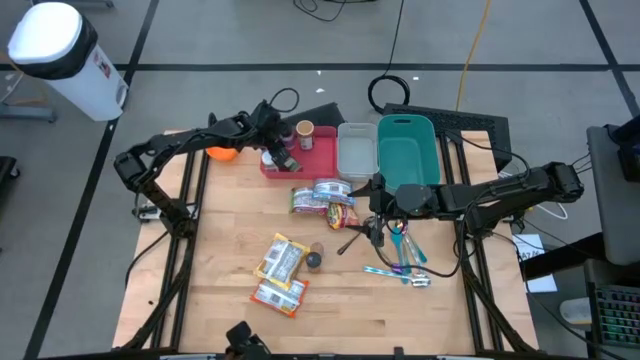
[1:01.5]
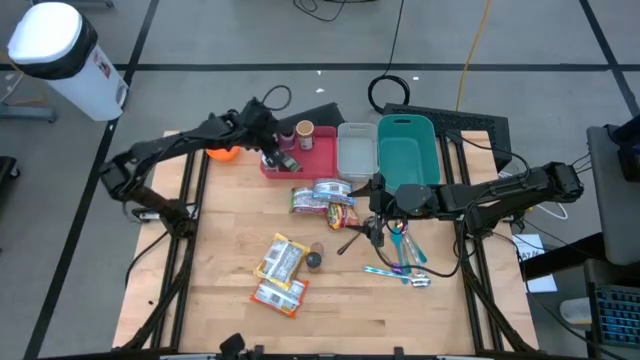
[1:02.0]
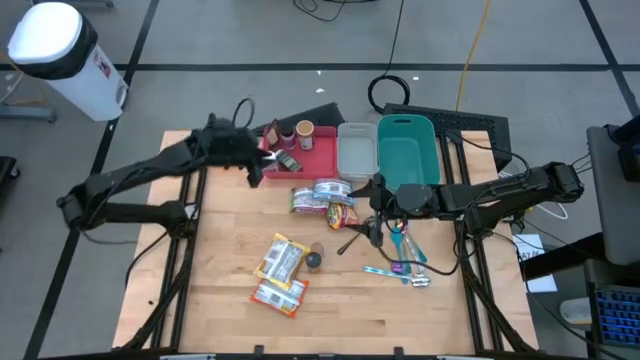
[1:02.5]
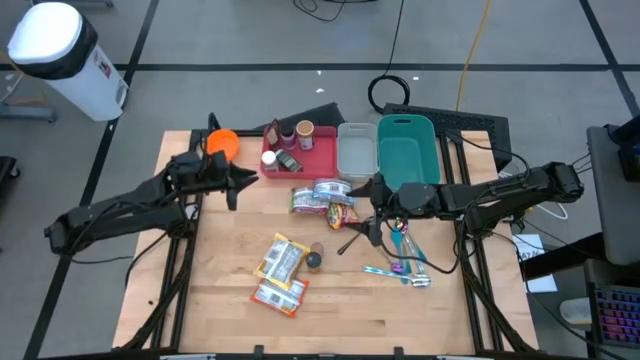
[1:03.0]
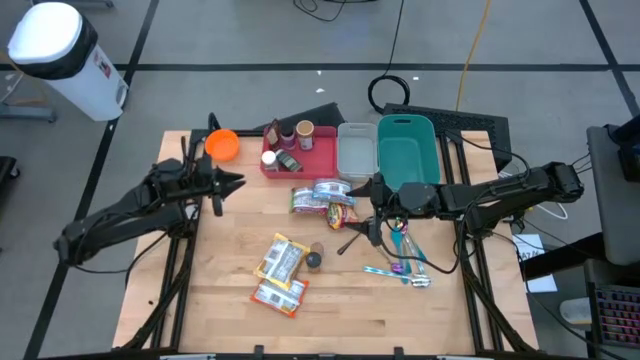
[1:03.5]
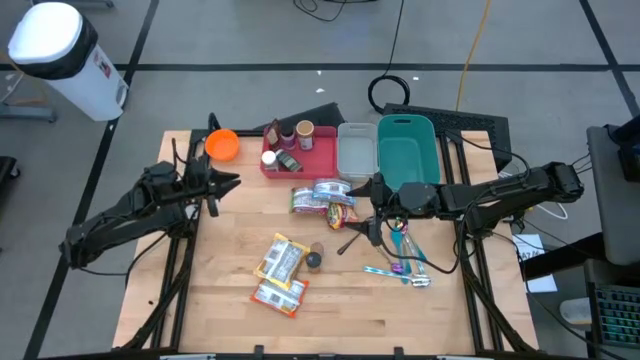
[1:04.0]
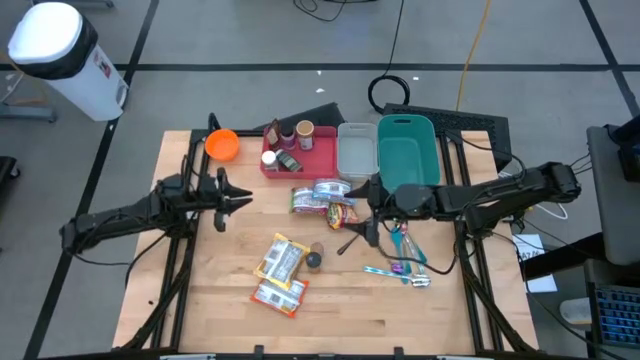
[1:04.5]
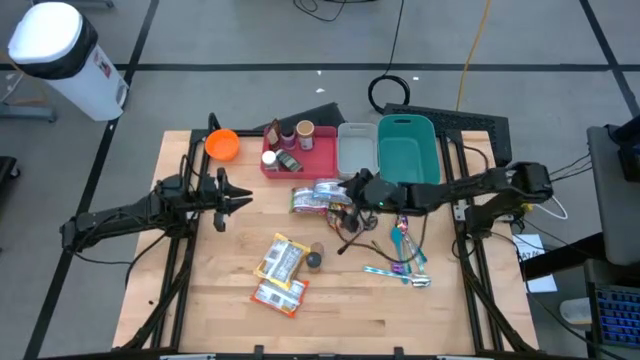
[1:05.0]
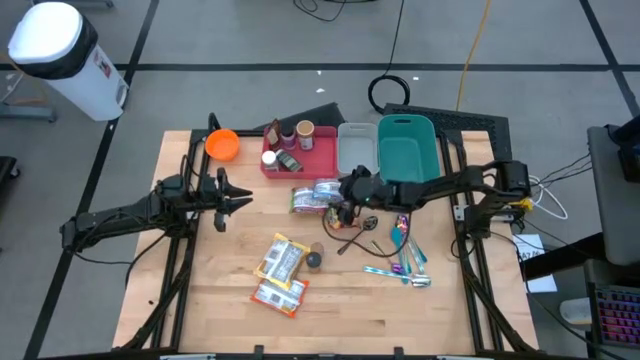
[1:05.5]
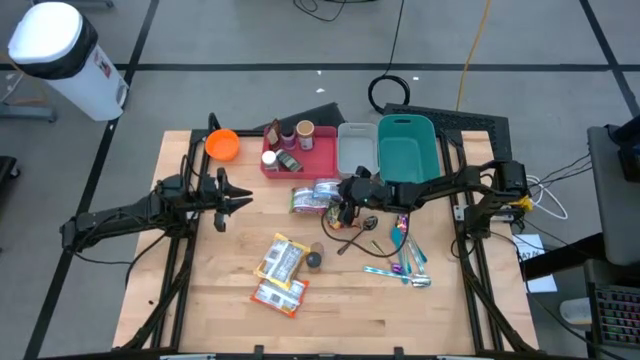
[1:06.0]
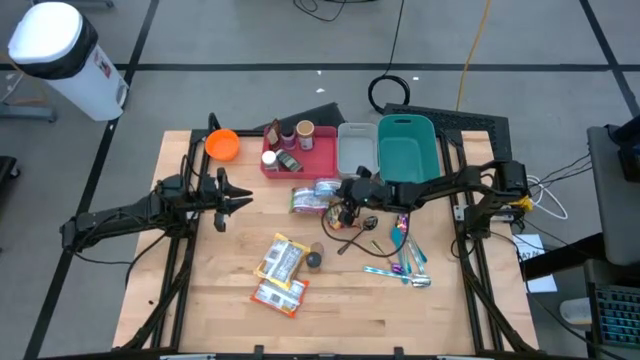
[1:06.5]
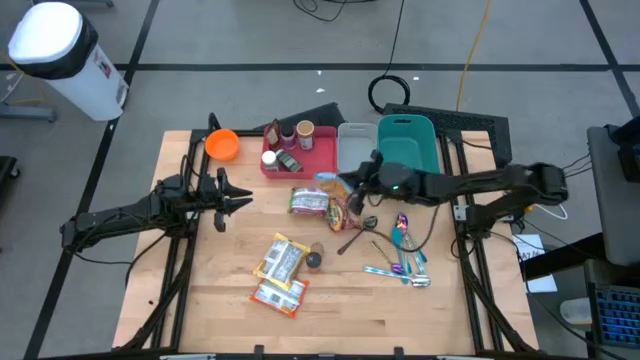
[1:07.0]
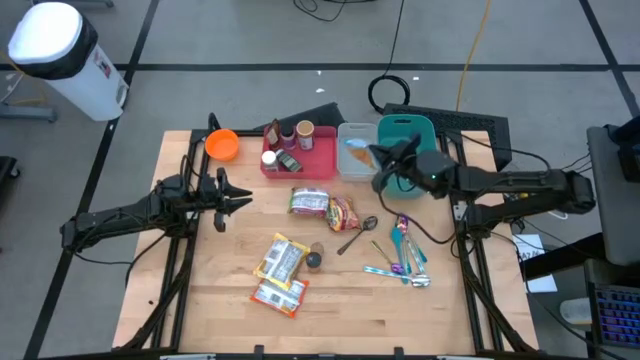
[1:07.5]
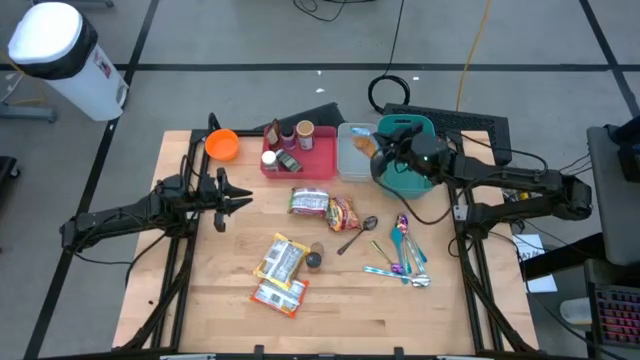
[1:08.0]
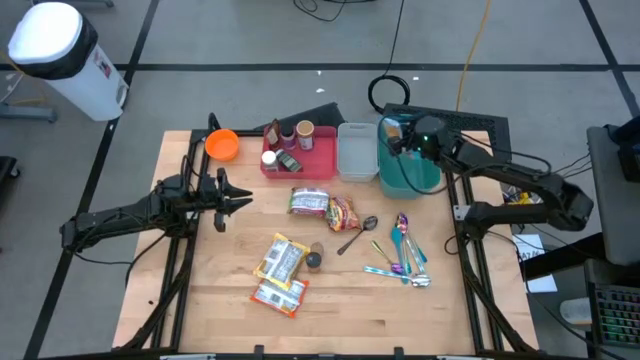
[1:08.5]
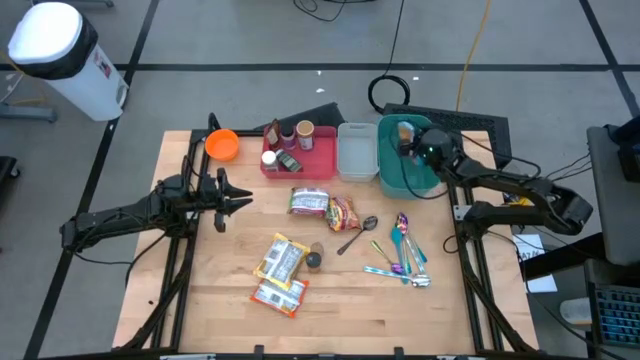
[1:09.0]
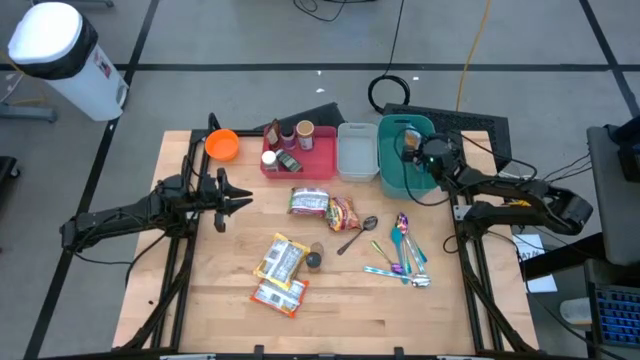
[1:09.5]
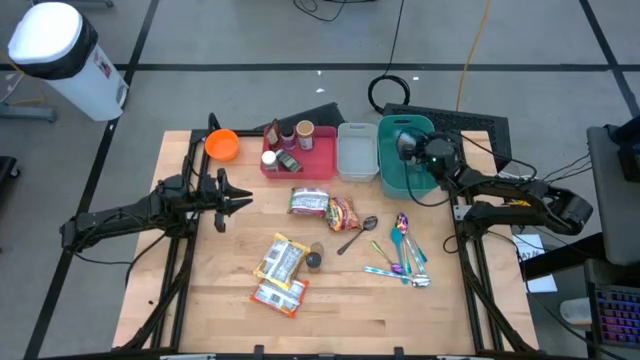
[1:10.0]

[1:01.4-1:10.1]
Task: Pick & Place Food Item
Put the blue noodle pack into the green bin

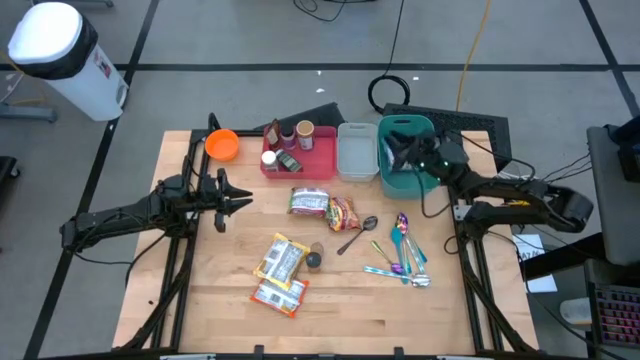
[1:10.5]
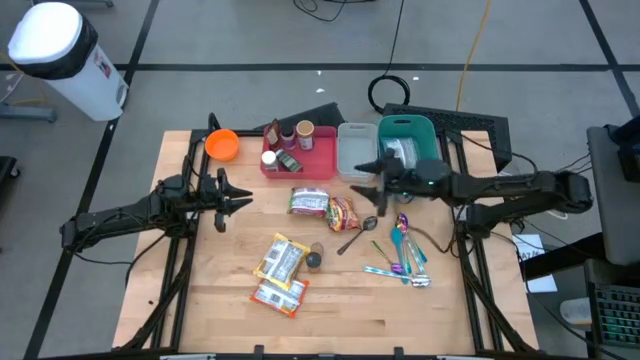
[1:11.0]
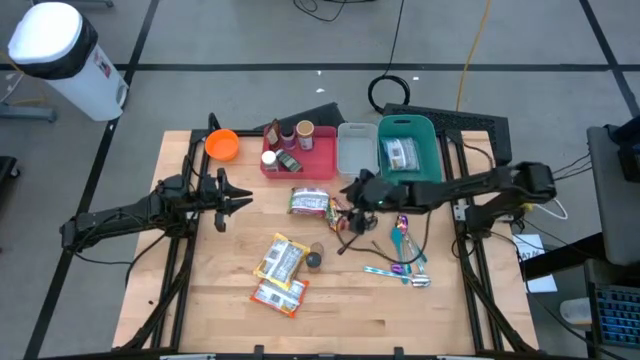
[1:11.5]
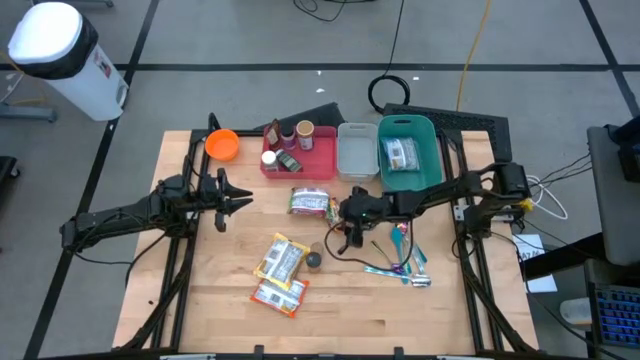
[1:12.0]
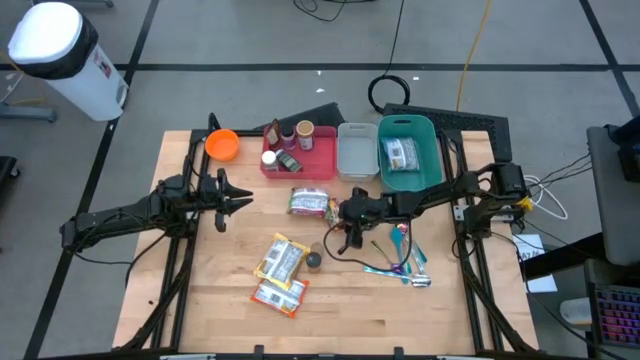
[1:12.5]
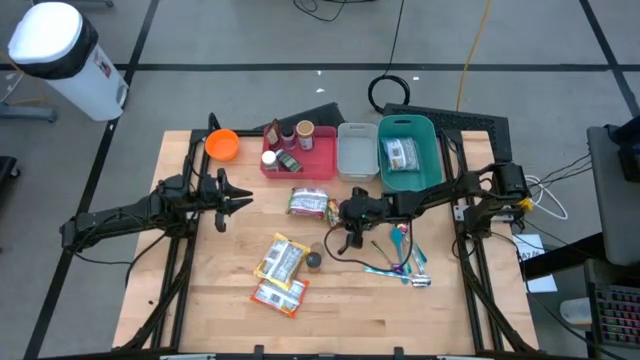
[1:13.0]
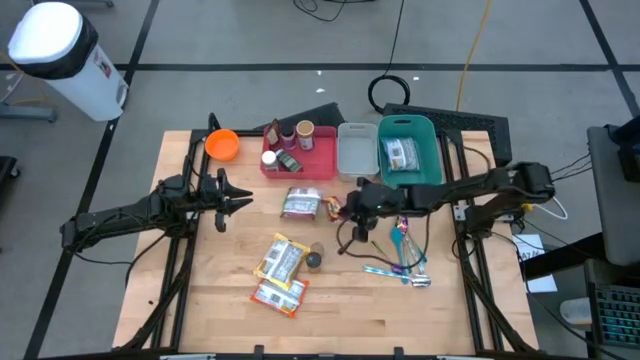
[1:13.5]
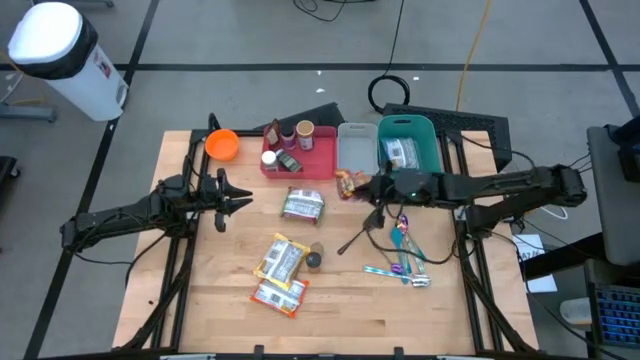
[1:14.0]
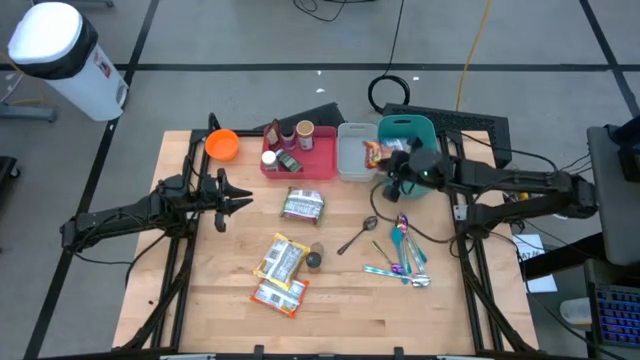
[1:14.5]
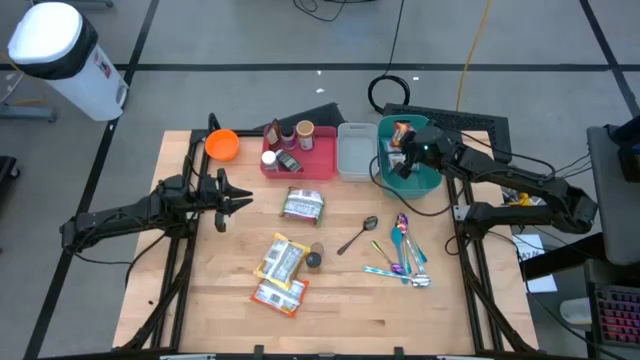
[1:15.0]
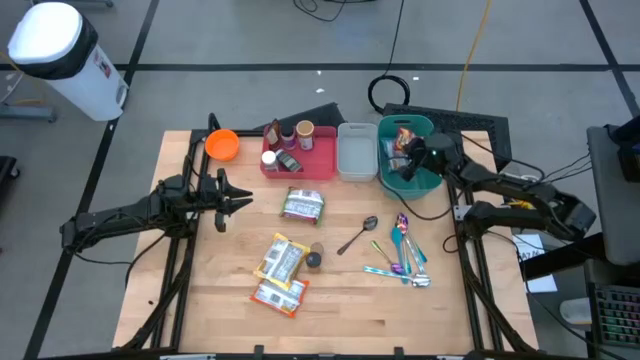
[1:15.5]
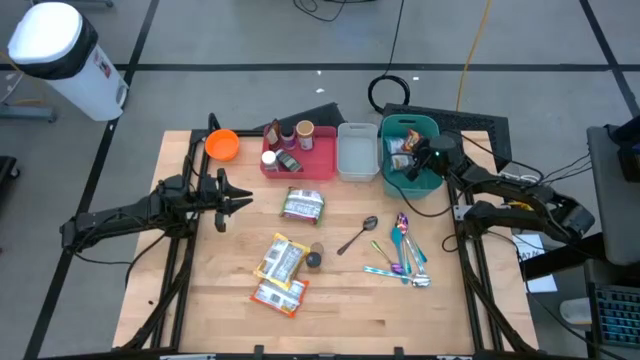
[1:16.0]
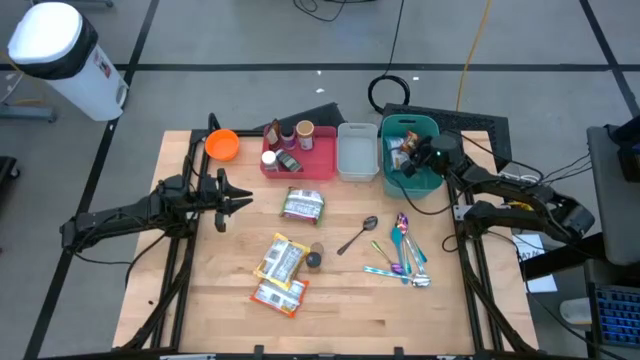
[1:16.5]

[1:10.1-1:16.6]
Put the red noodle pack into the green bin

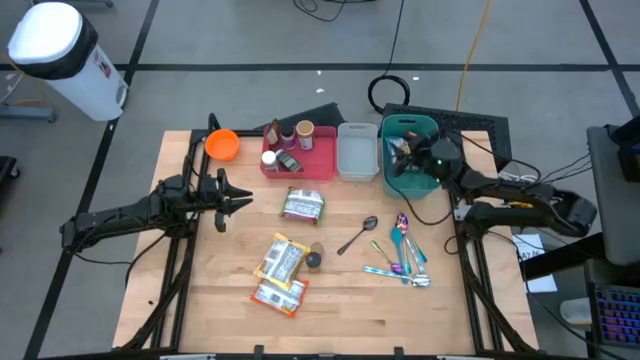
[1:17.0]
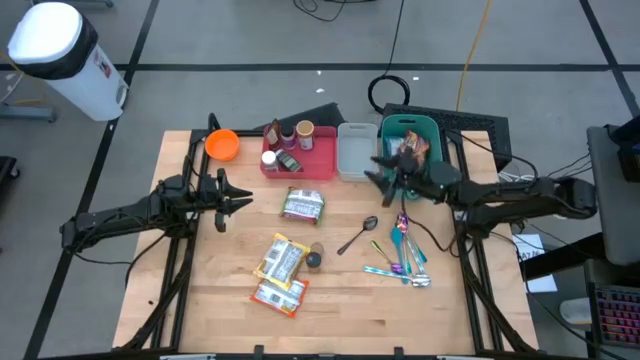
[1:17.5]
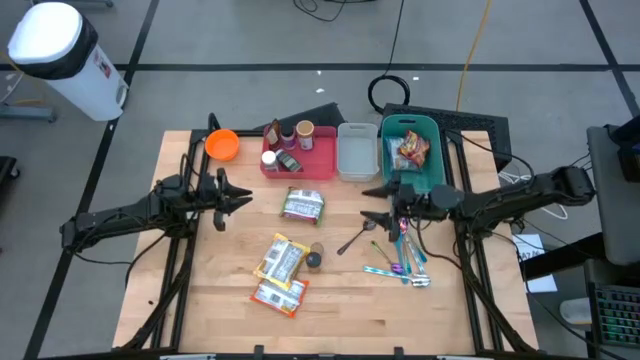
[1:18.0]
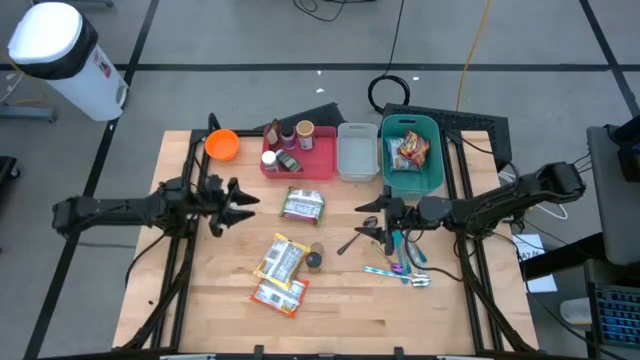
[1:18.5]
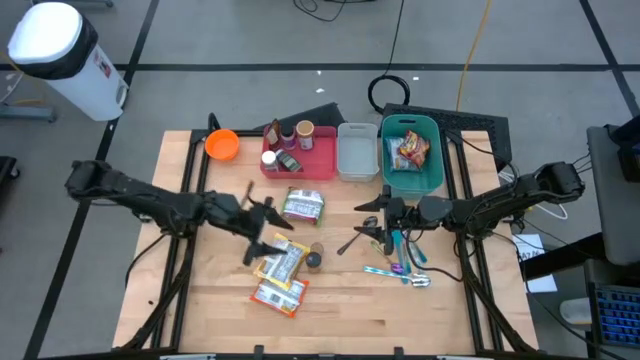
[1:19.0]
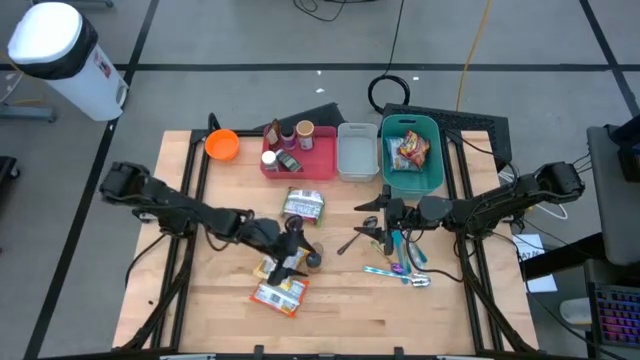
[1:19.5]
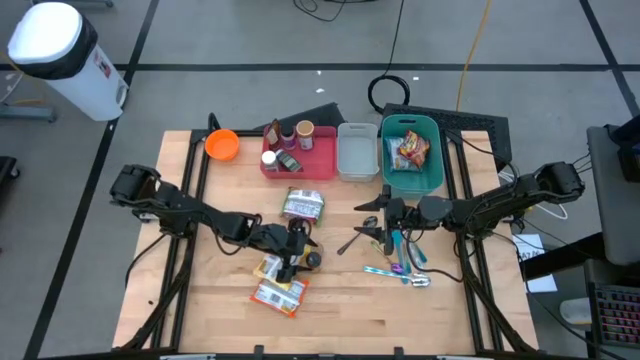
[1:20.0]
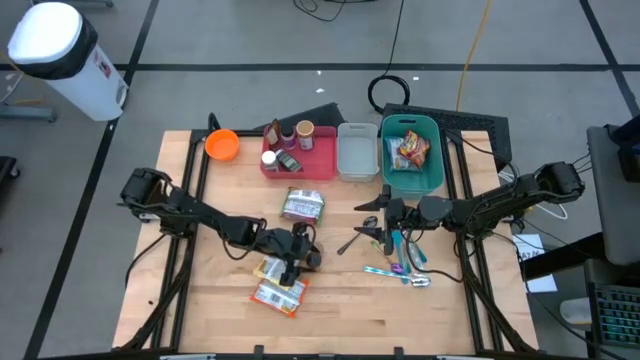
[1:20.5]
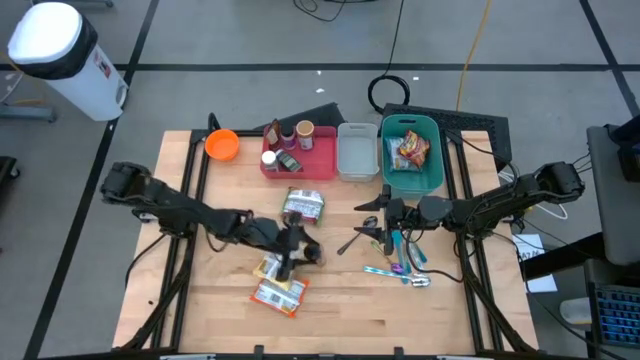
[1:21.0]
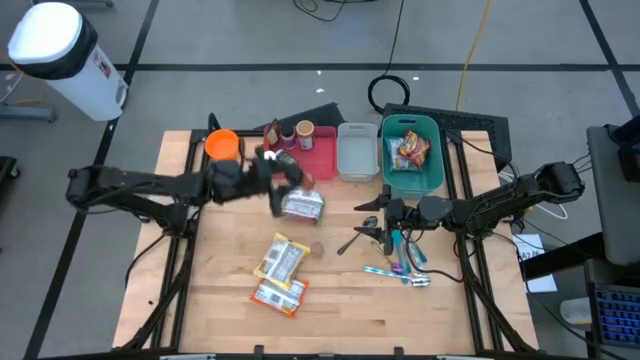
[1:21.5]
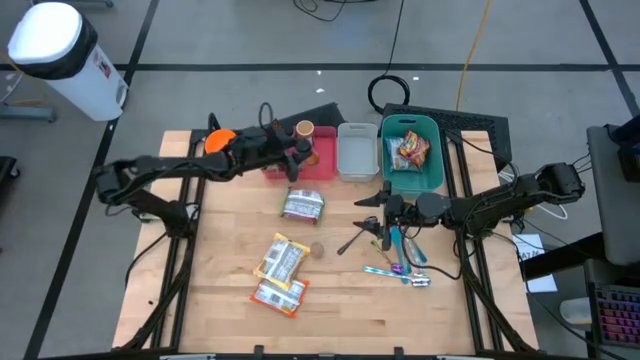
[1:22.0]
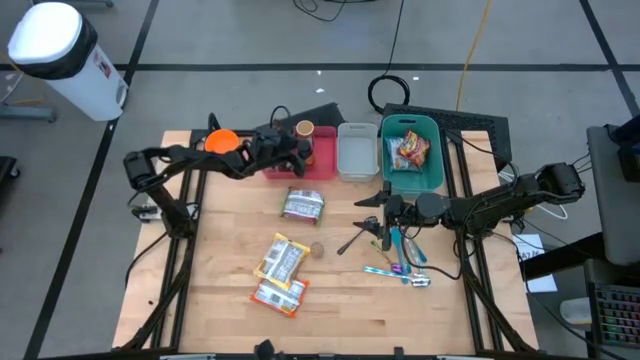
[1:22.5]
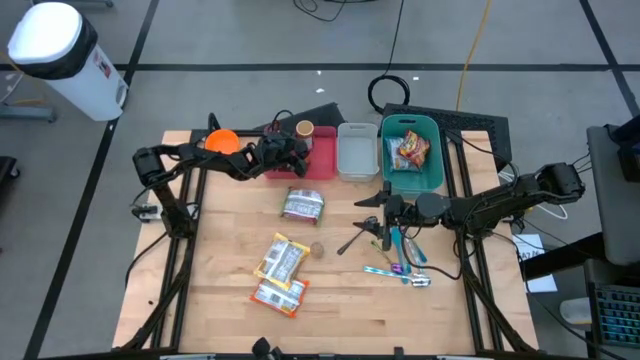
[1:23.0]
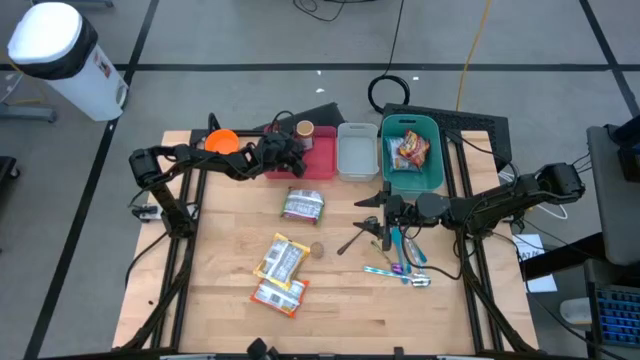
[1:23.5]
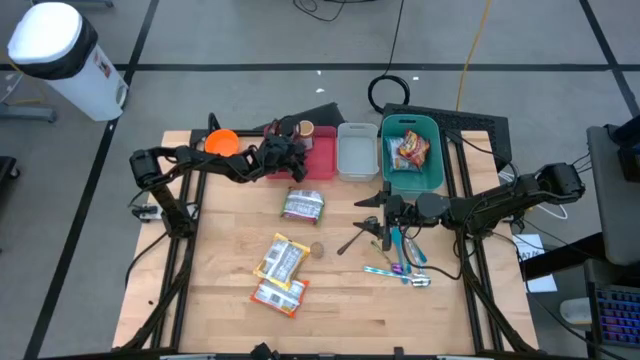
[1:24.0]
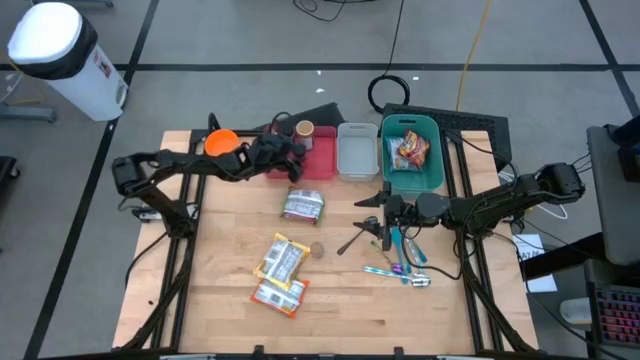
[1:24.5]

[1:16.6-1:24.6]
Put the orange seasoning bottle into the red bin
